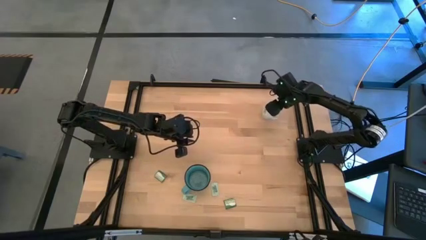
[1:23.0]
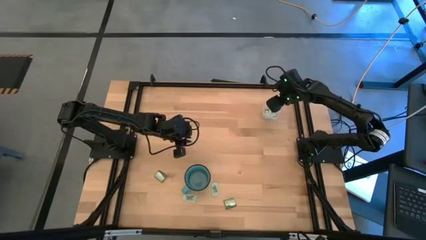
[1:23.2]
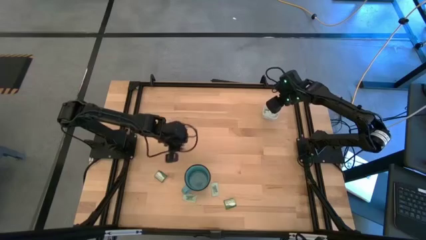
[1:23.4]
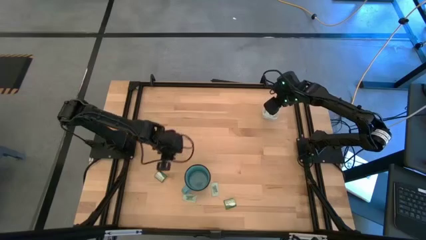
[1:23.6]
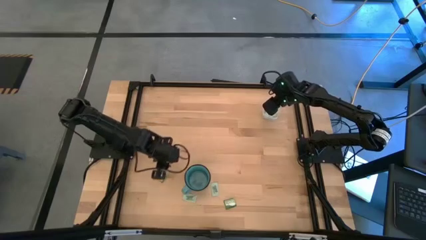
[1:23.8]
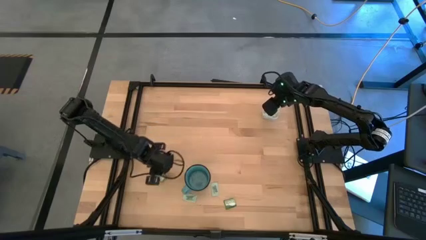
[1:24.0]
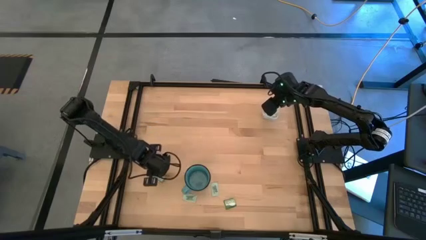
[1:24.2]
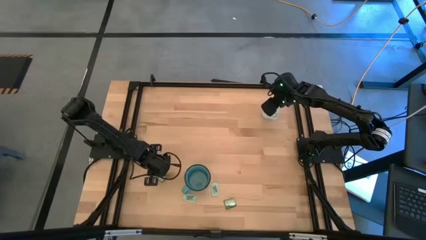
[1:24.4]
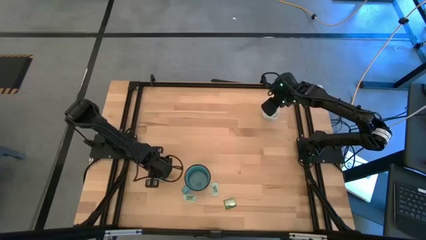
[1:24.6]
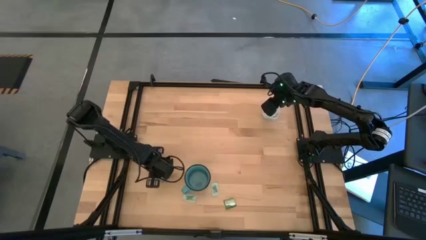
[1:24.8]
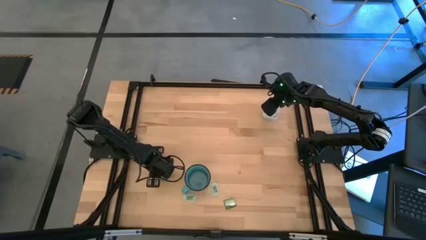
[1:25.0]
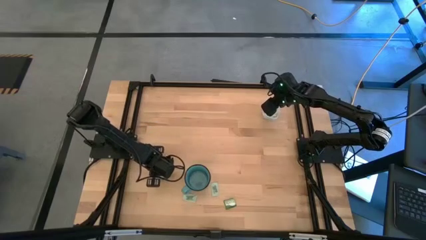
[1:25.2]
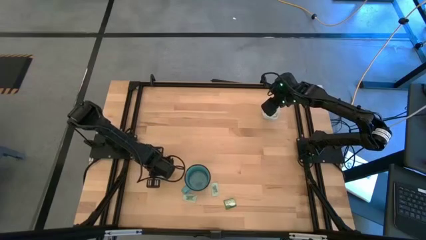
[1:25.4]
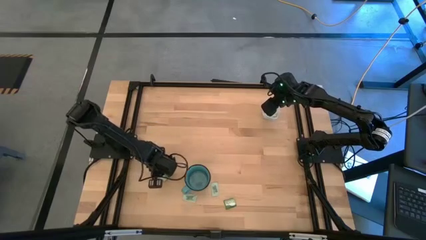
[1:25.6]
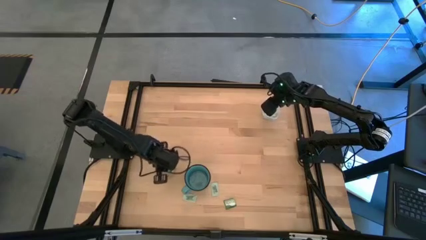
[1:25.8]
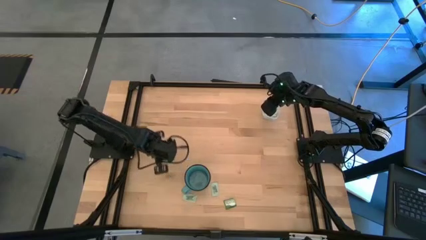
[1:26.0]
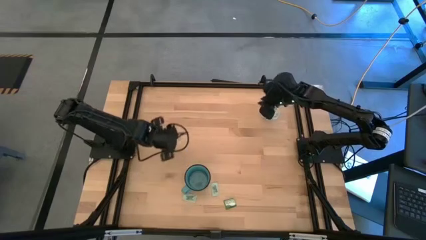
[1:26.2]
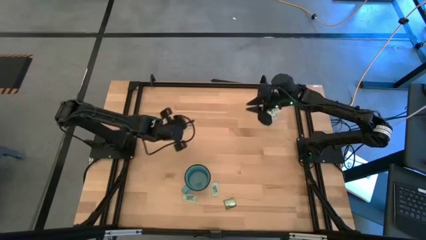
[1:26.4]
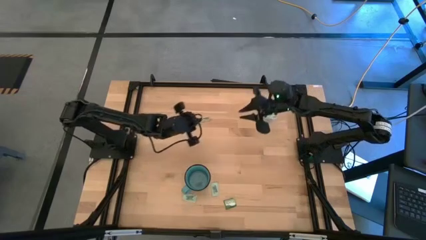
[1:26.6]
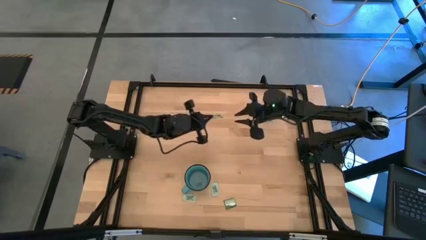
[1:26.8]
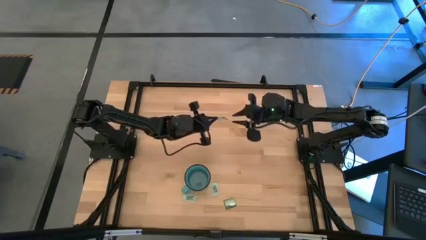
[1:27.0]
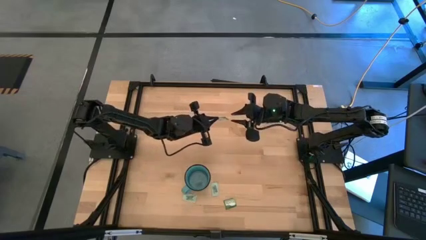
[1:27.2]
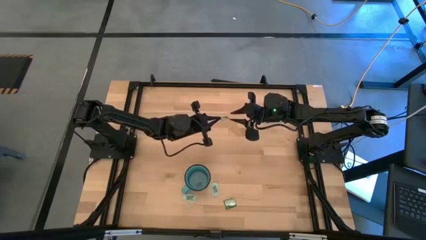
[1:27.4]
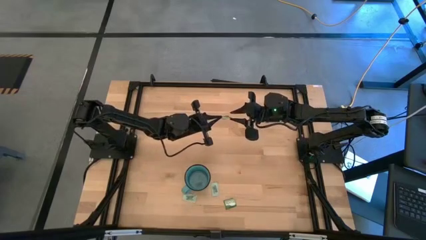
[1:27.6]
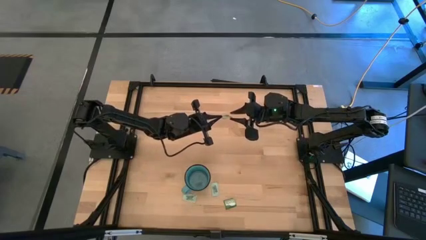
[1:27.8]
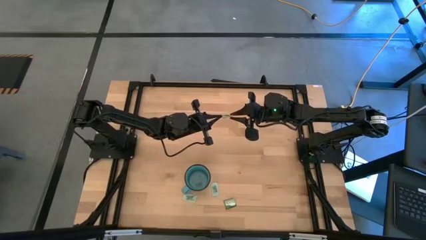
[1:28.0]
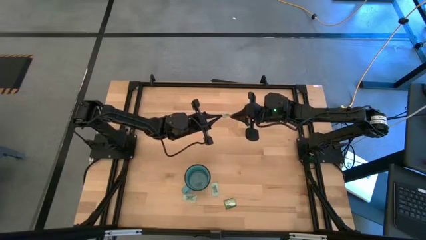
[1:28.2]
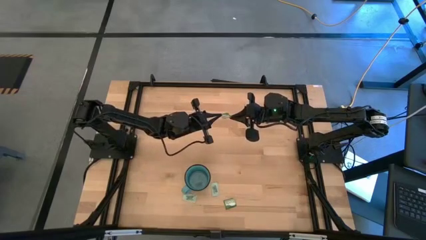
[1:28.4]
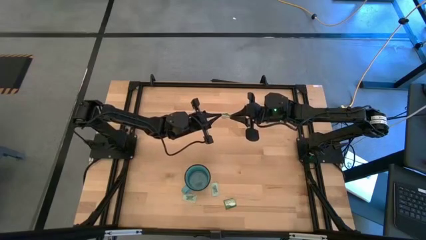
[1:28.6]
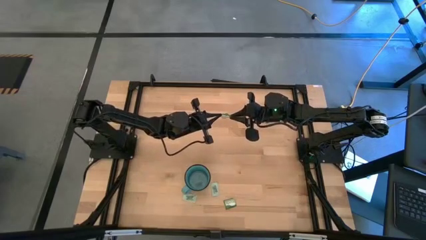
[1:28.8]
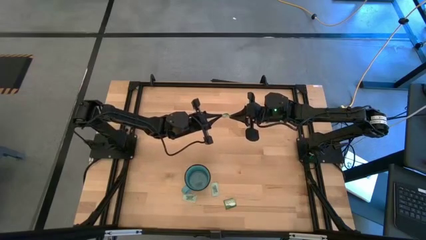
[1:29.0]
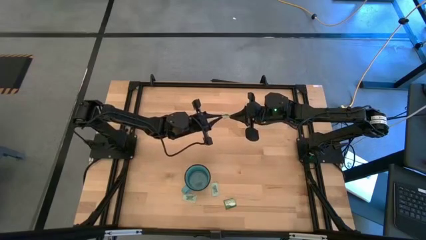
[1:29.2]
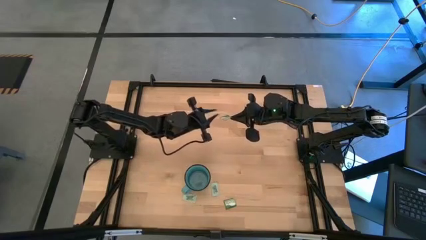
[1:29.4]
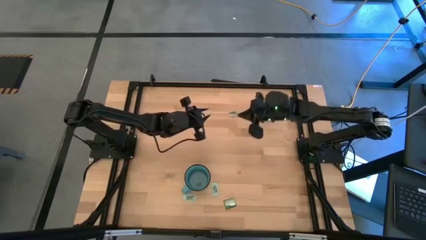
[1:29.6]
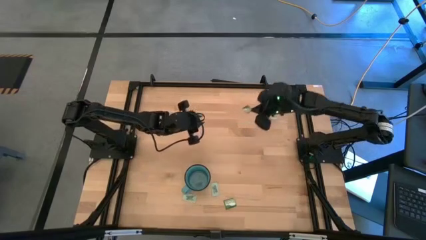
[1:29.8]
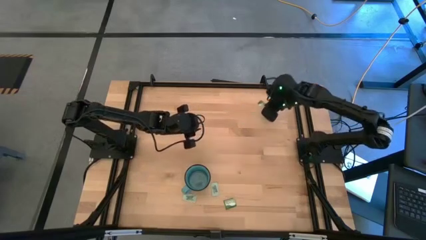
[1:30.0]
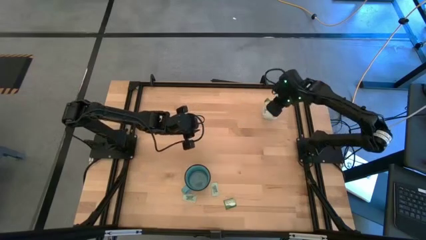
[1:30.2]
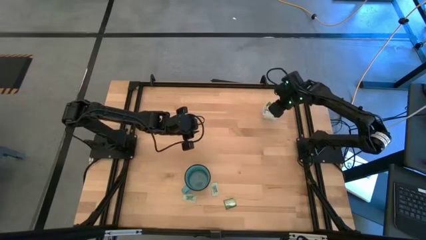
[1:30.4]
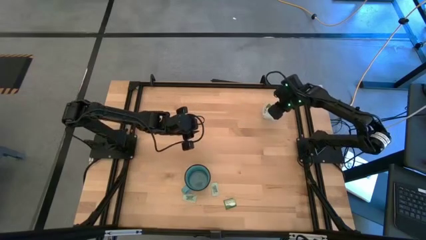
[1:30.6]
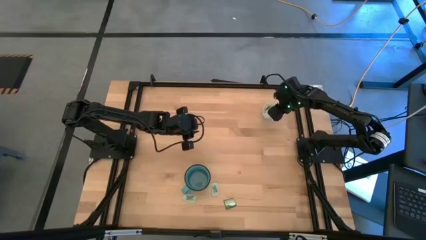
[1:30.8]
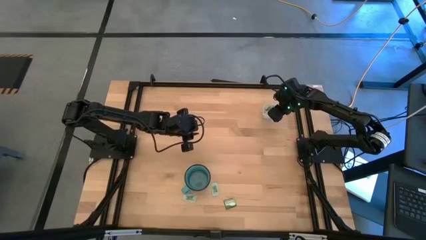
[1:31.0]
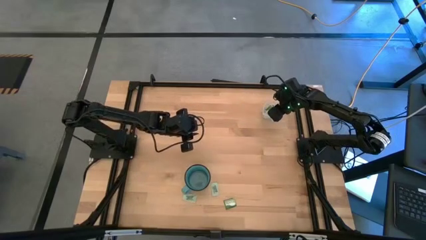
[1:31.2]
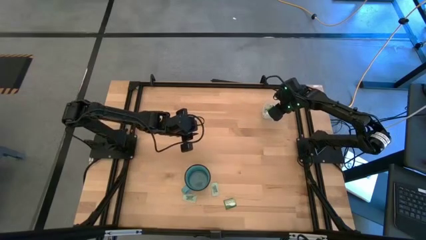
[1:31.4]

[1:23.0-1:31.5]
Task: Pick and place items into bin
Put the truvia packet into the transparent bin

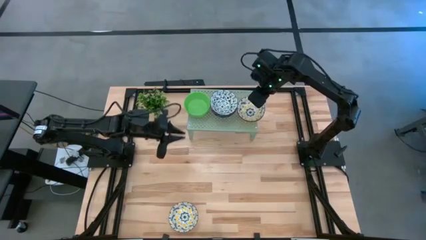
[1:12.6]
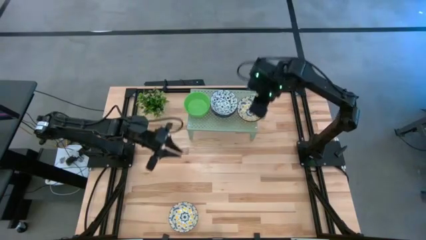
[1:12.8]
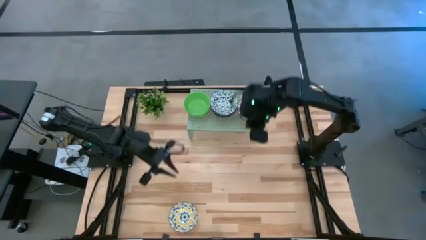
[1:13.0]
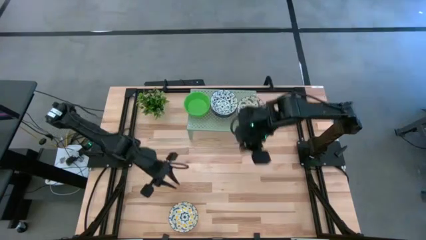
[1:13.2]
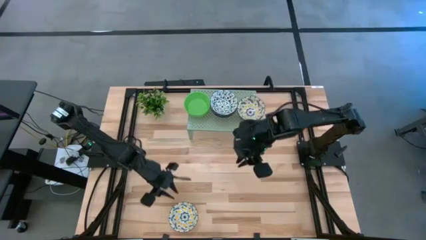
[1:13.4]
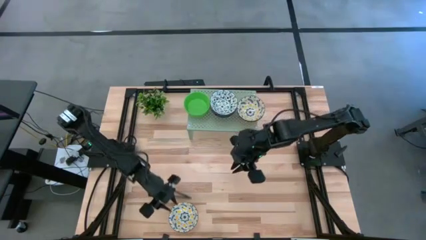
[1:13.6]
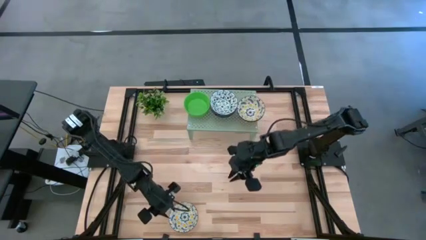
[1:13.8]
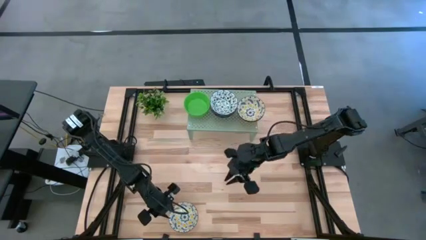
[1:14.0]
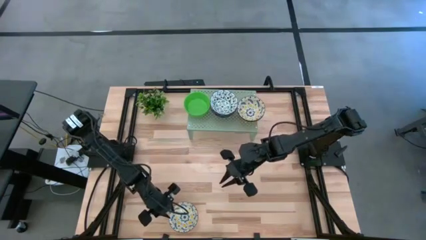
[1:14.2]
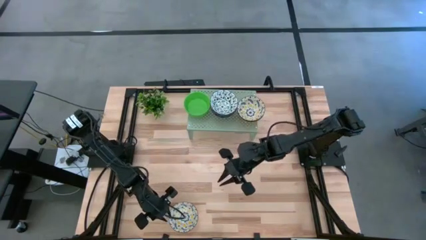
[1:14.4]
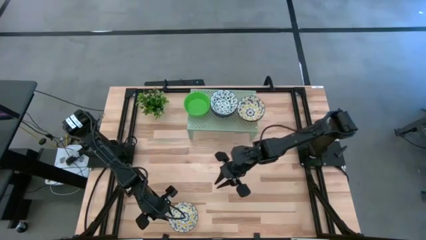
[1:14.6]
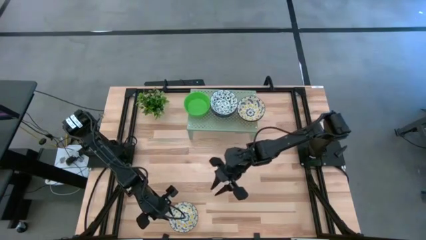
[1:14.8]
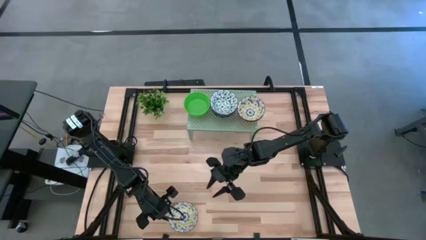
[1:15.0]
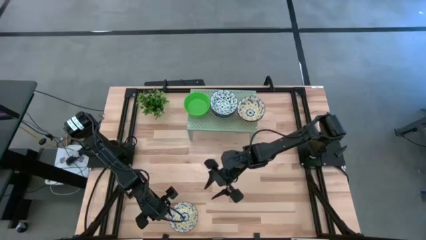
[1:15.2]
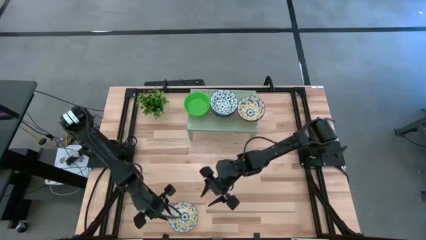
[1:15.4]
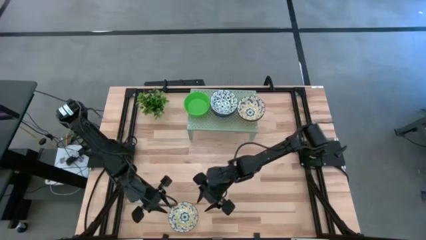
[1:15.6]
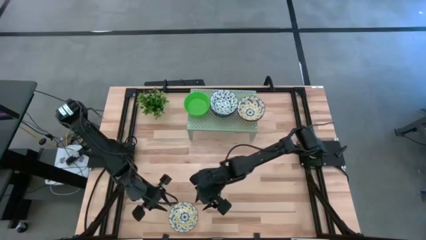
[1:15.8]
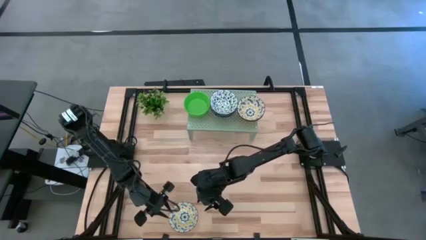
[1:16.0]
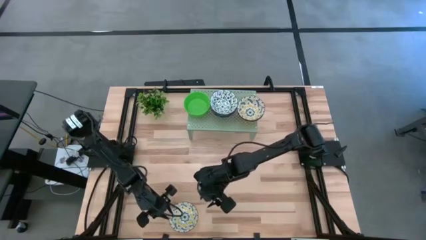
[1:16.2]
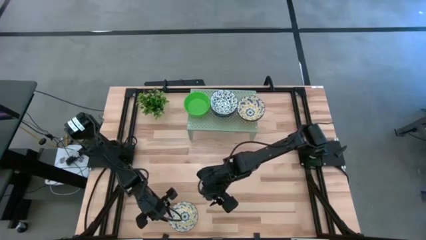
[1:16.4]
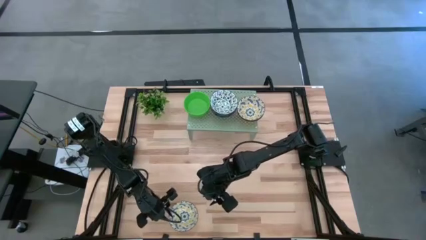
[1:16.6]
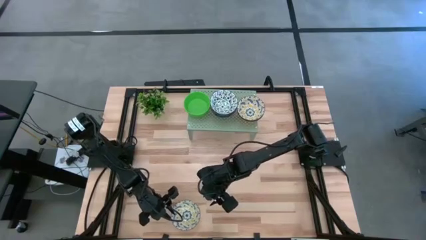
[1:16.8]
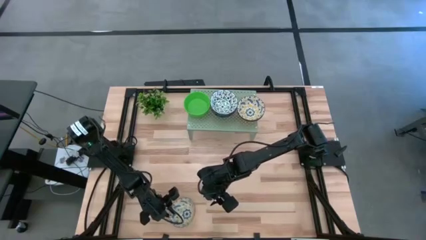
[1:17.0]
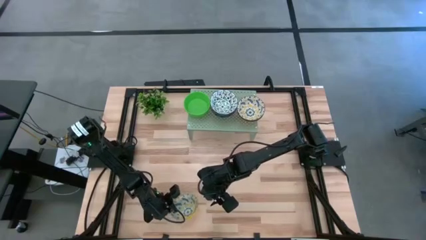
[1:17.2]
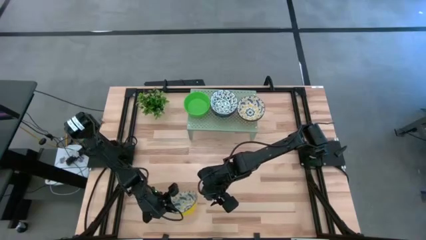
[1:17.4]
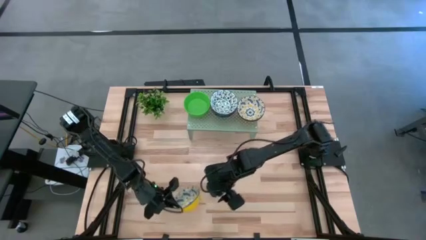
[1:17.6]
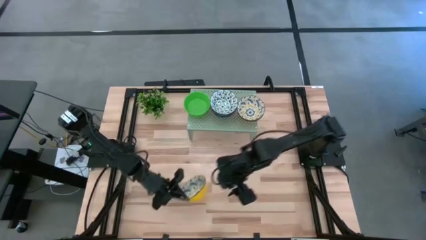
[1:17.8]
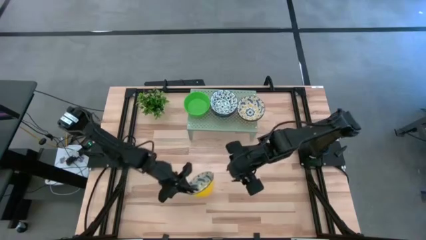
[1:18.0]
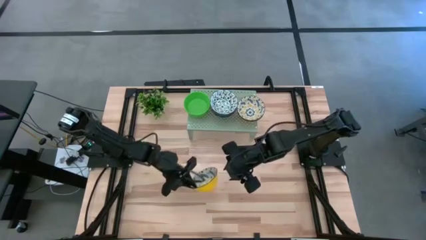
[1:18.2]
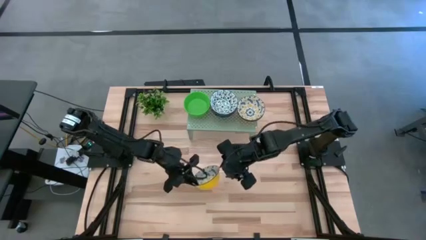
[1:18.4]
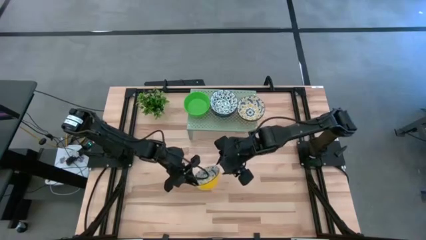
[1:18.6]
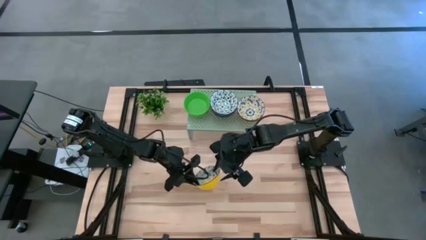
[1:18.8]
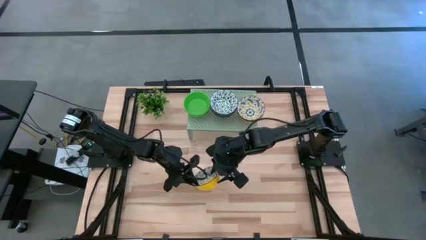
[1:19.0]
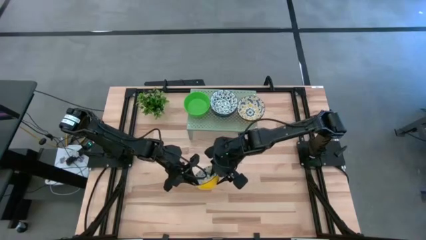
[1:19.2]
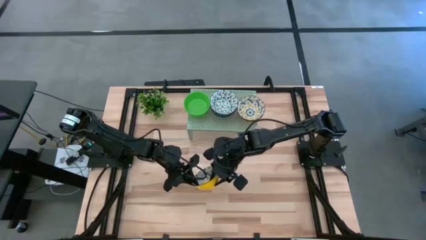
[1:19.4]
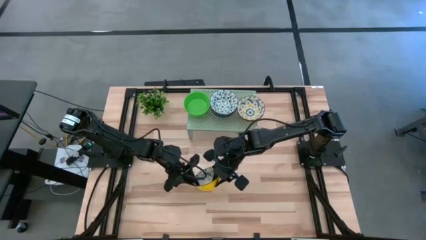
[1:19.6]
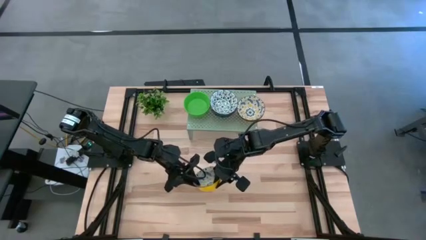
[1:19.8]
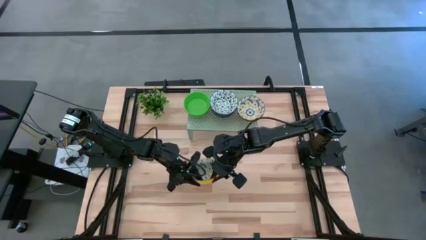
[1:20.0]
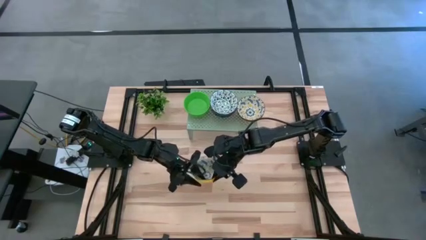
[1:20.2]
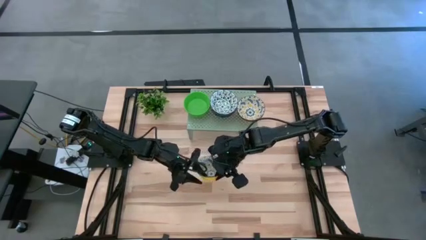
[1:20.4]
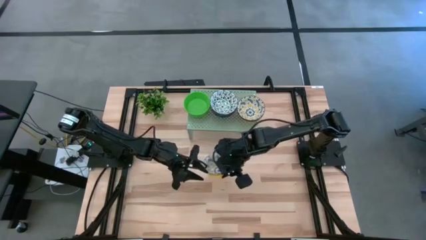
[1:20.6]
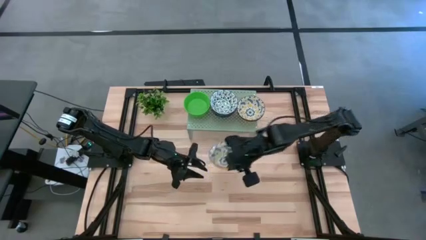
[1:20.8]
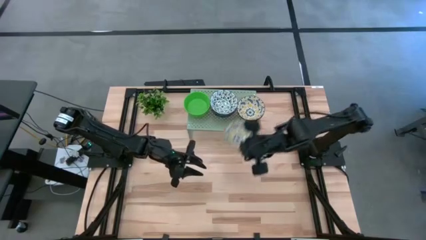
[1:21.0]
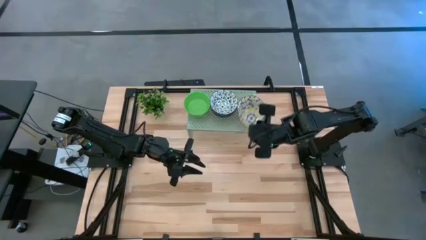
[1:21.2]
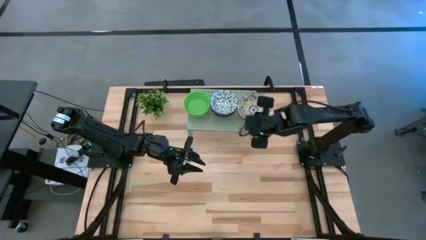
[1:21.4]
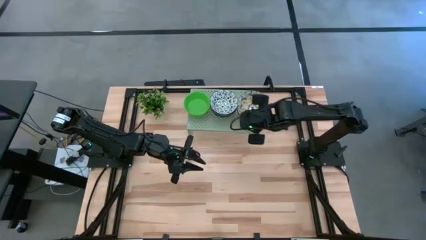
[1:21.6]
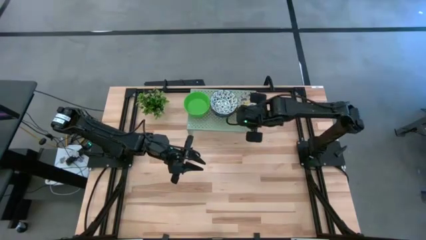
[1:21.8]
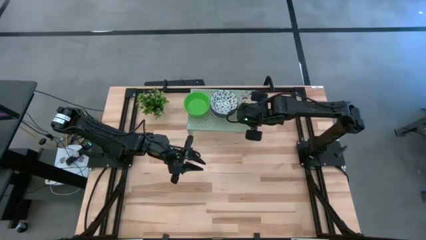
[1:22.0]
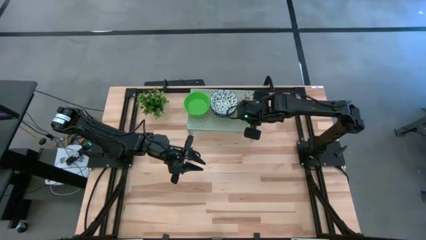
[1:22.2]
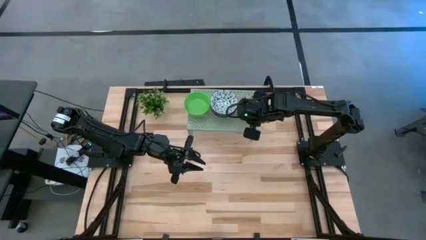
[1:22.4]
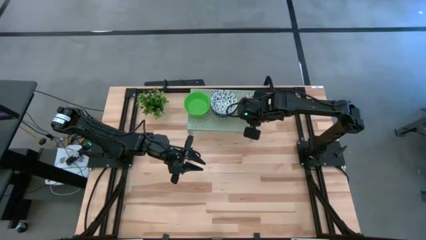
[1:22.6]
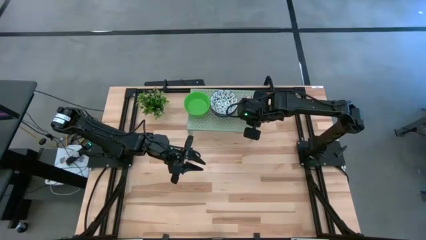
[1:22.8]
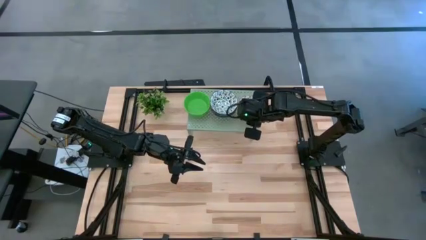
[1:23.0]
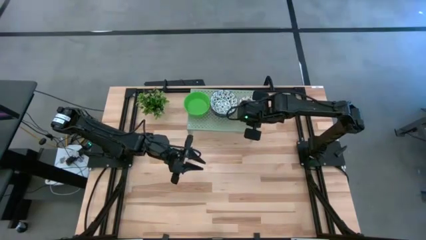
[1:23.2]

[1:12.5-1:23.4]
Task: Pick & Place Mini bowls
Stack the yellow bowl on top of the yellow bowl on the shelf
